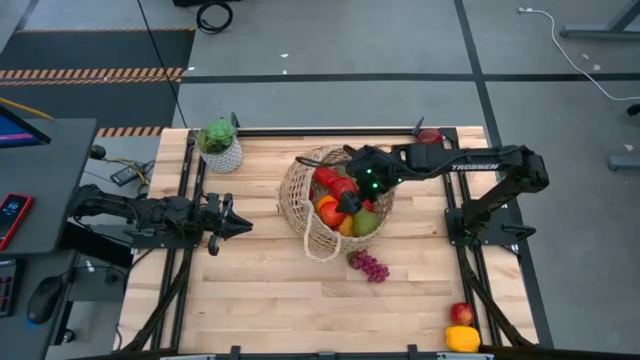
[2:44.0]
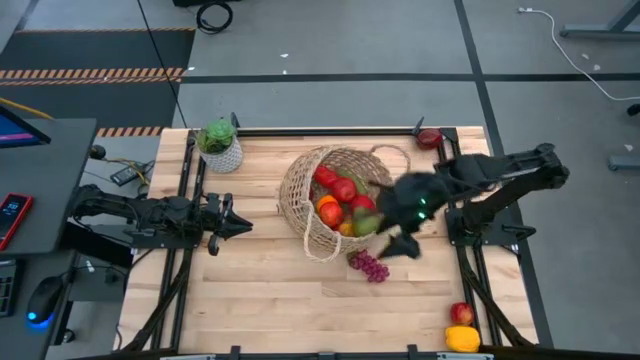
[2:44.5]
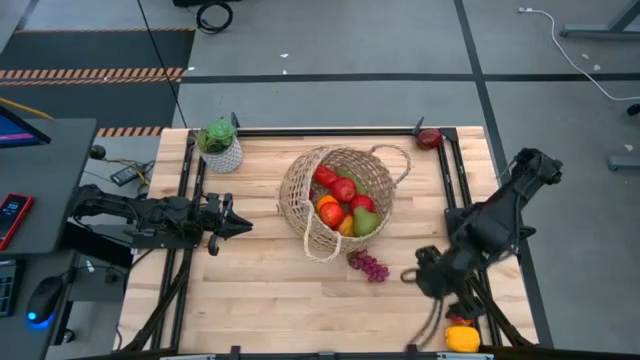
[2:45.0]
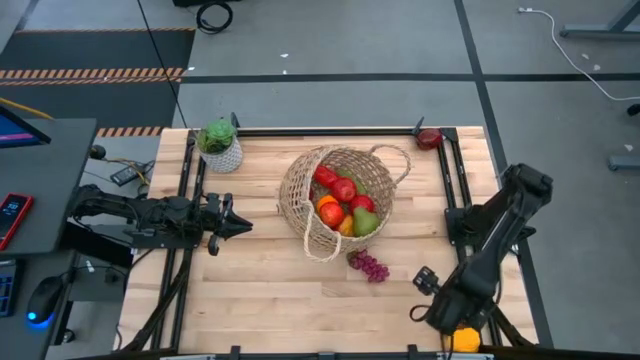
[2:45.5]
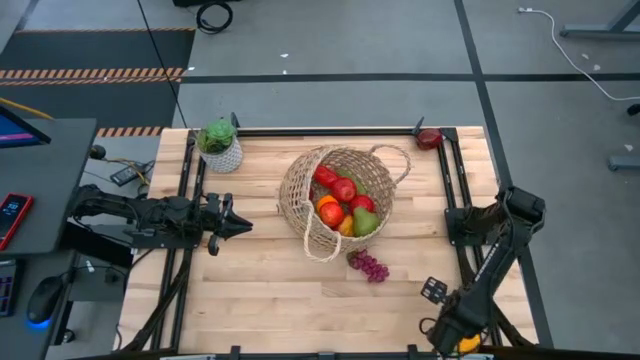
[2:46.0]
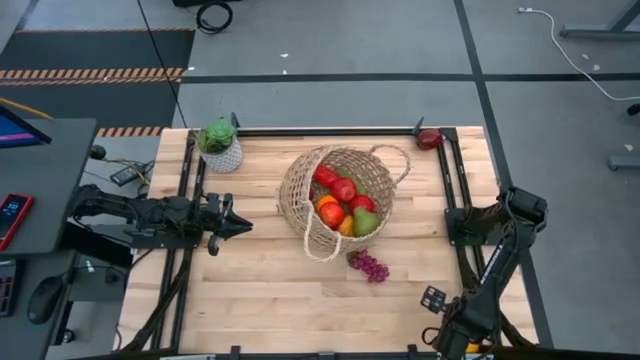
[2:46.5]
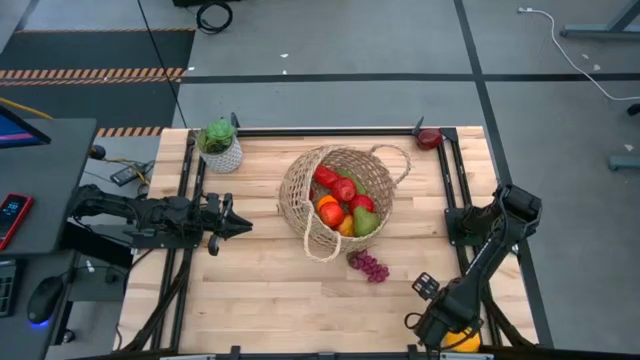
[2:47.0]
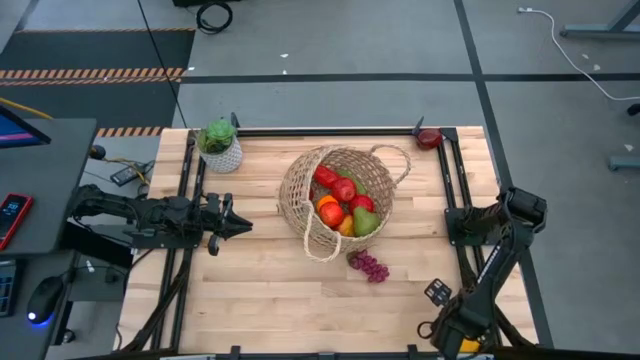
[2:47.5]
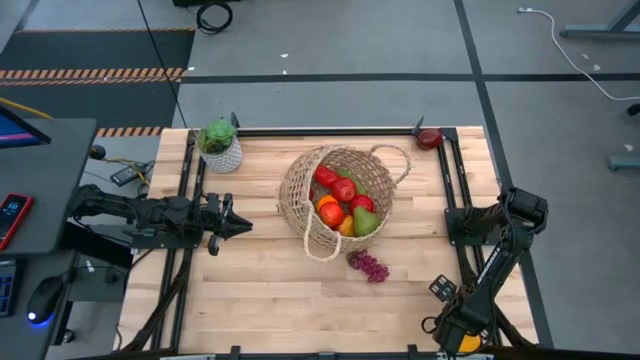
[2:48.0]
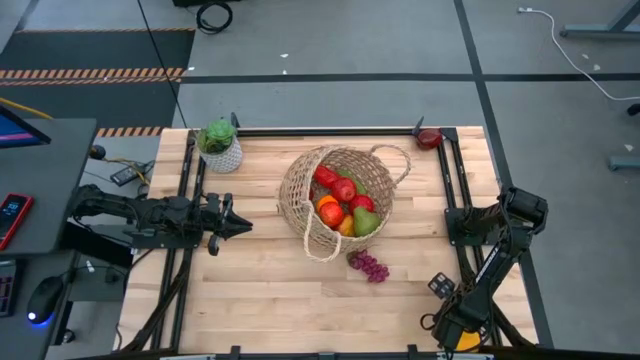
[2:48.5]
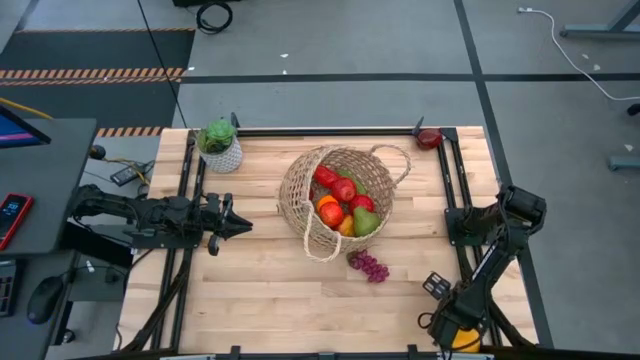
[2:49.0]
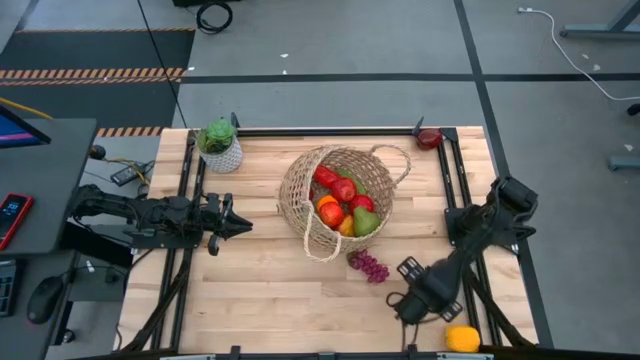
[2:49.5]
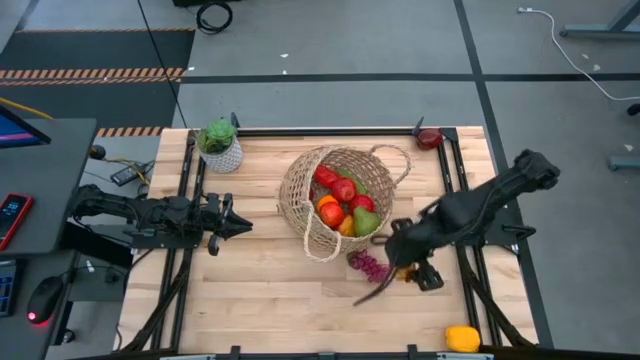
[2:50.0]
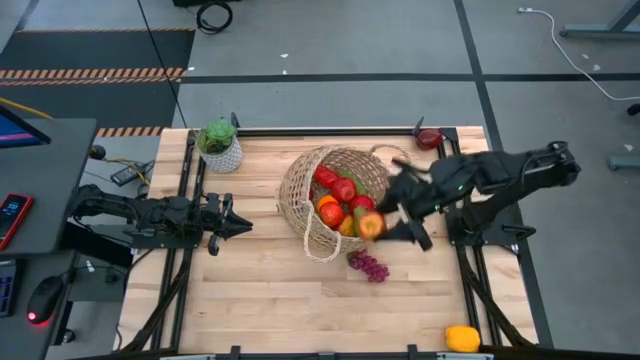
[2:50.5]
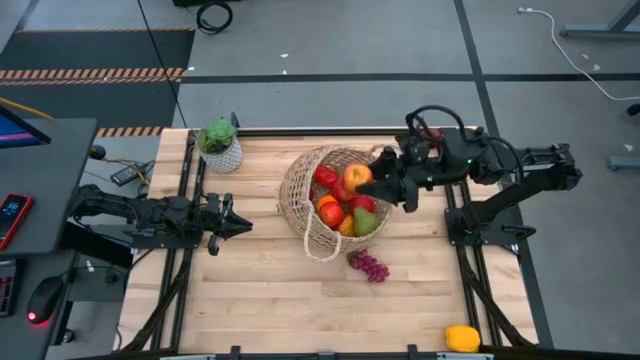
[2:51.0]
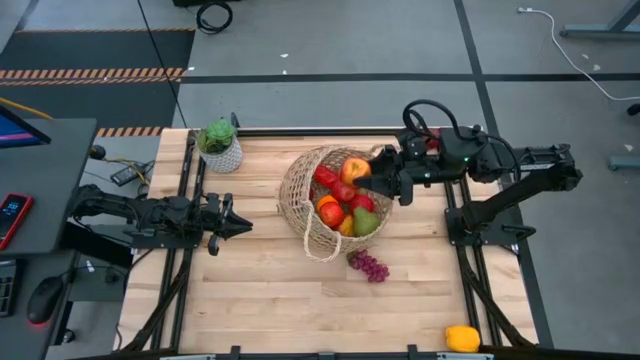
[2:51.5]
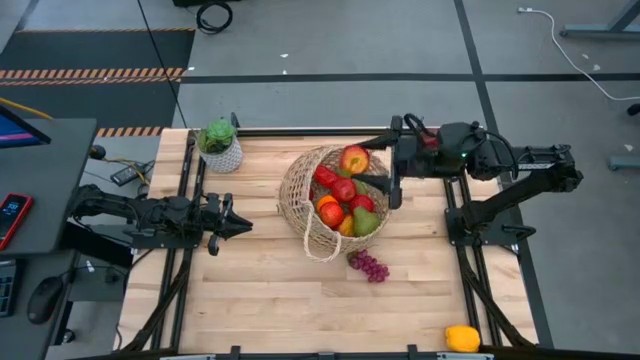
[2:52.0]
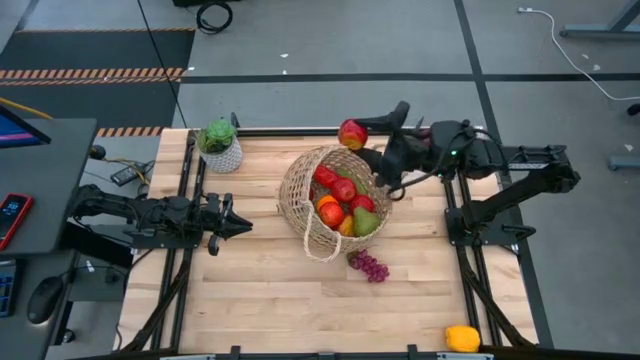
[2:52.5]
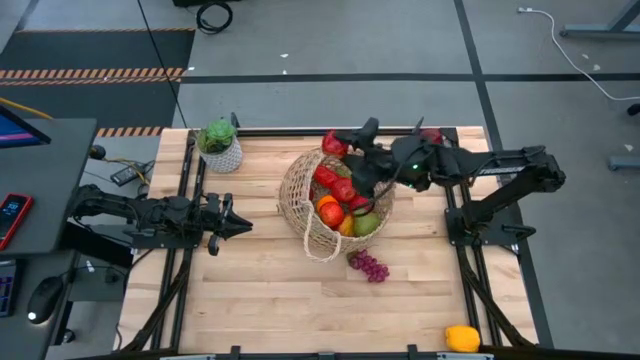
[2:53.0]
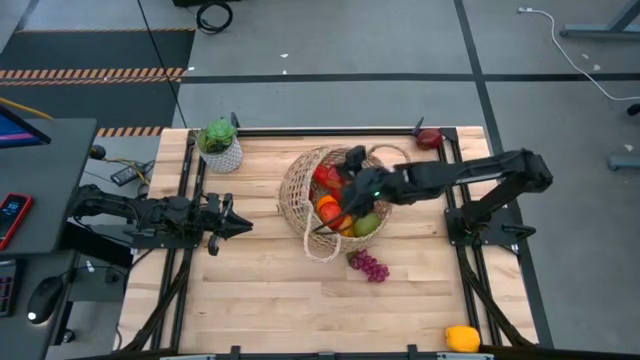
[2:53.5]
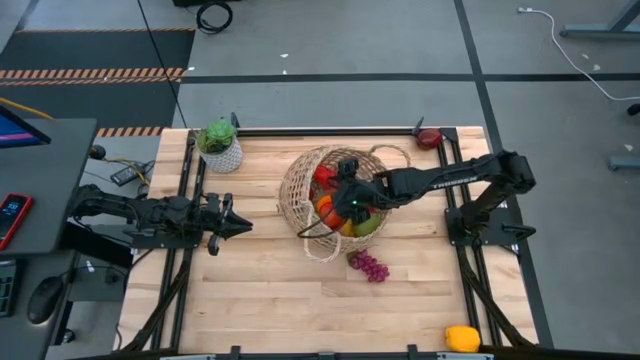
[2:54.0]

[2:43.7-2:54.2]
Task: Build produce basket
Put the red apple into the woven basket

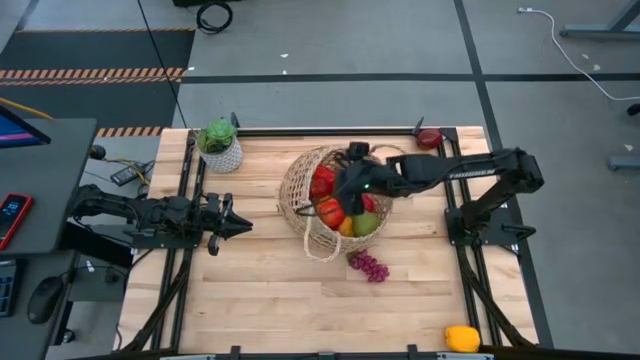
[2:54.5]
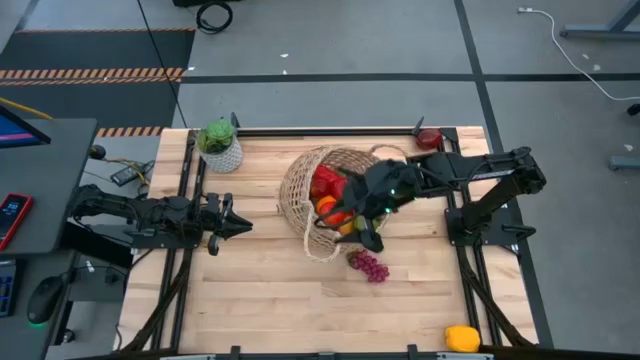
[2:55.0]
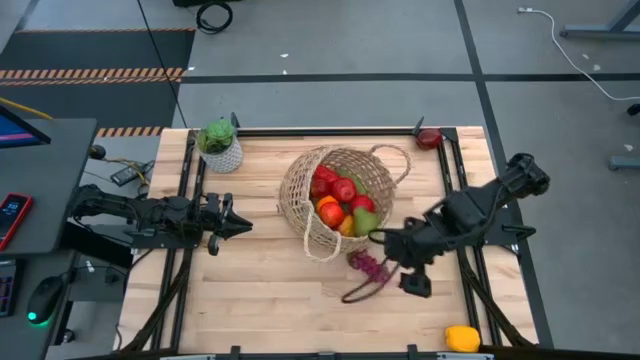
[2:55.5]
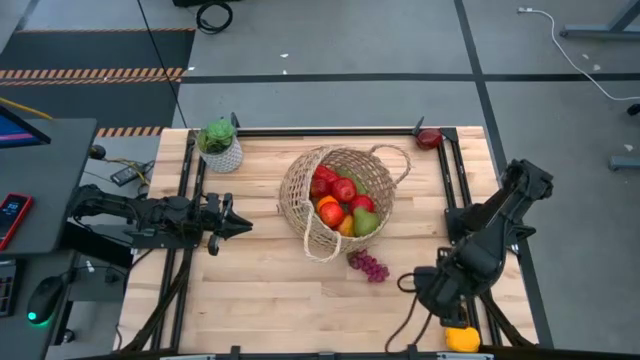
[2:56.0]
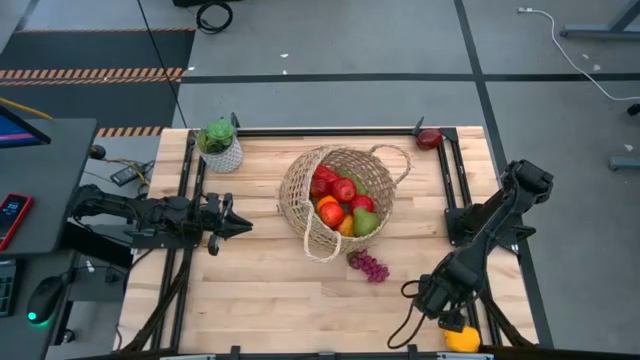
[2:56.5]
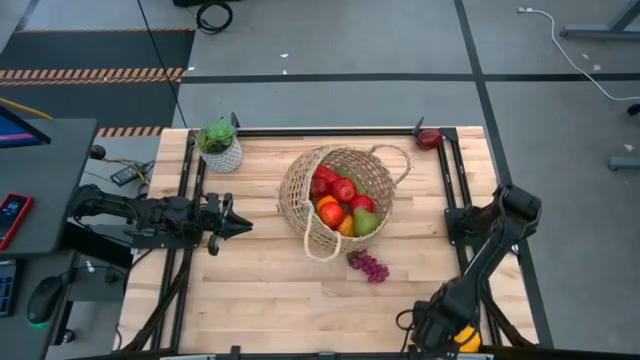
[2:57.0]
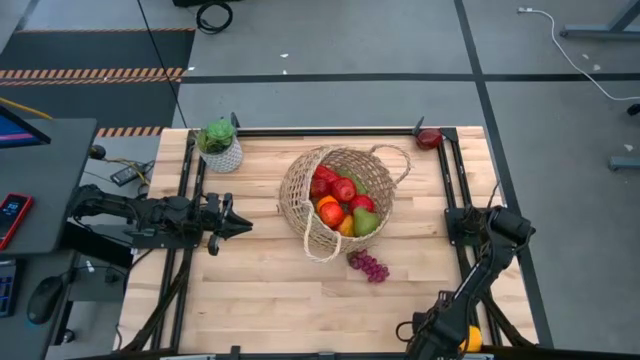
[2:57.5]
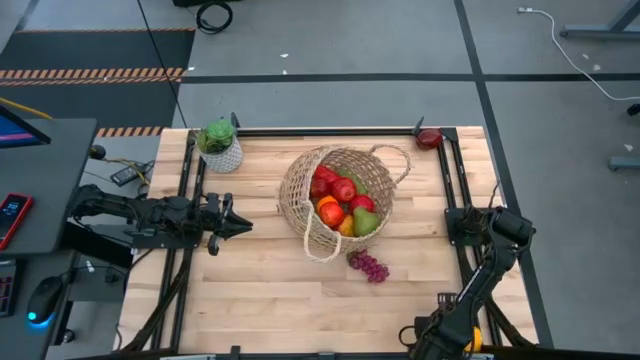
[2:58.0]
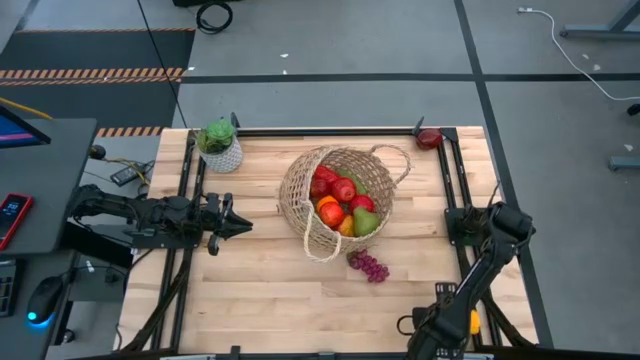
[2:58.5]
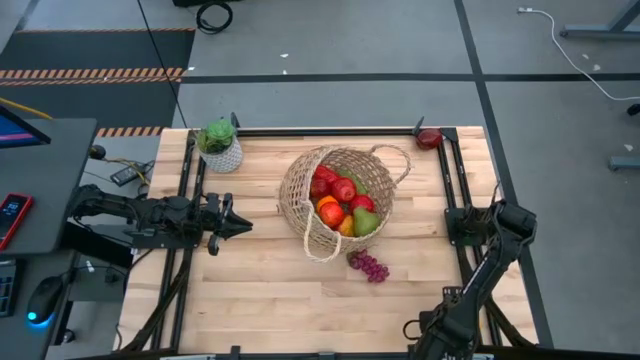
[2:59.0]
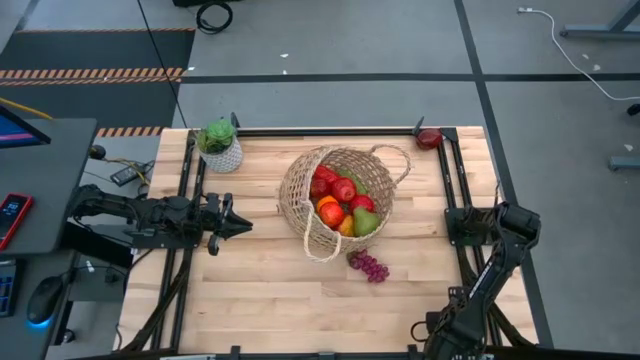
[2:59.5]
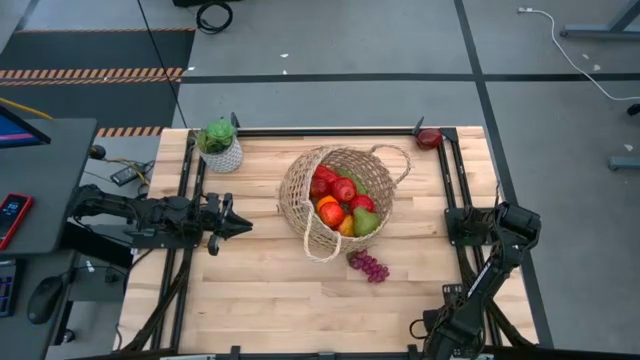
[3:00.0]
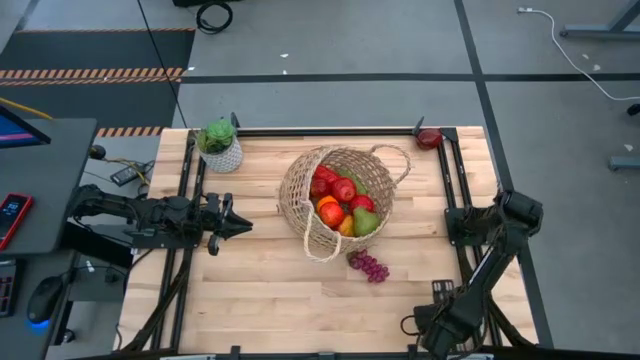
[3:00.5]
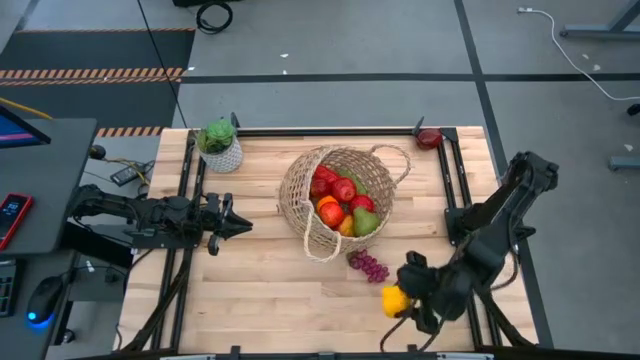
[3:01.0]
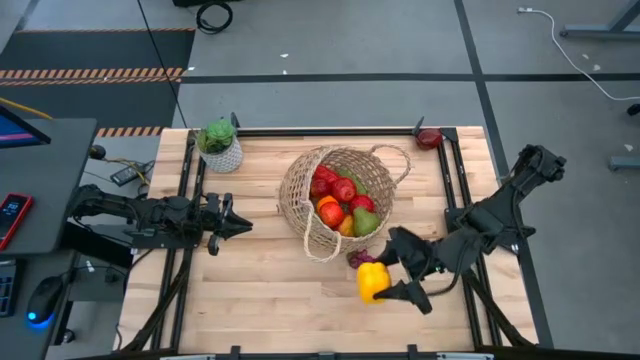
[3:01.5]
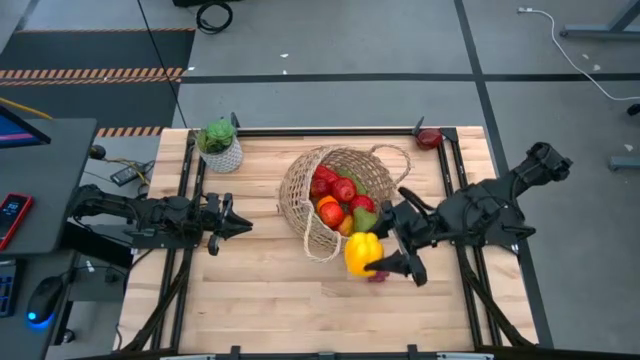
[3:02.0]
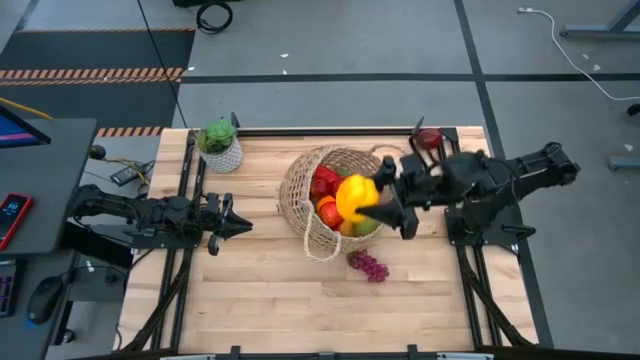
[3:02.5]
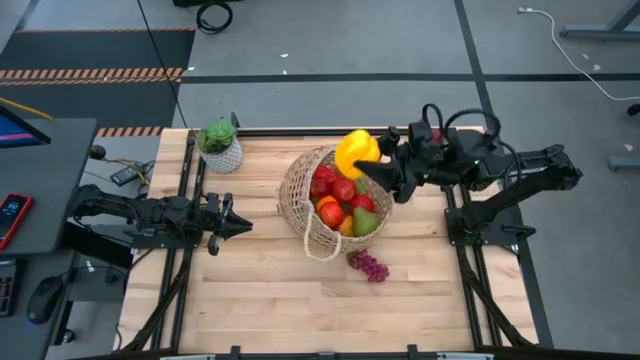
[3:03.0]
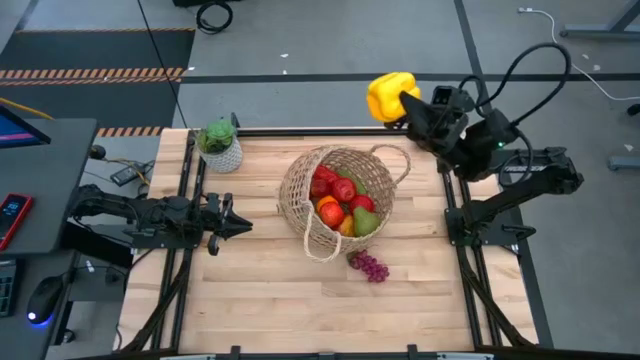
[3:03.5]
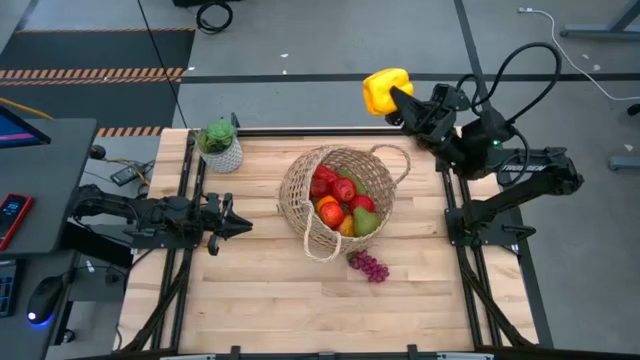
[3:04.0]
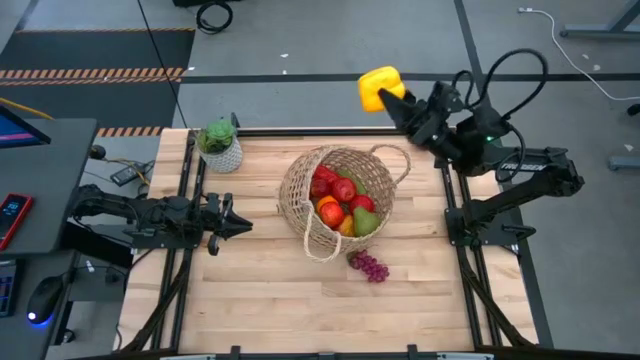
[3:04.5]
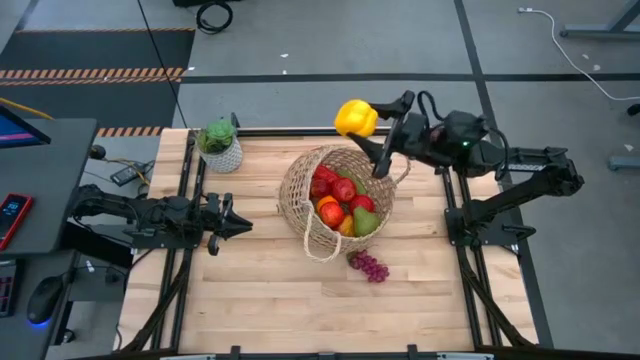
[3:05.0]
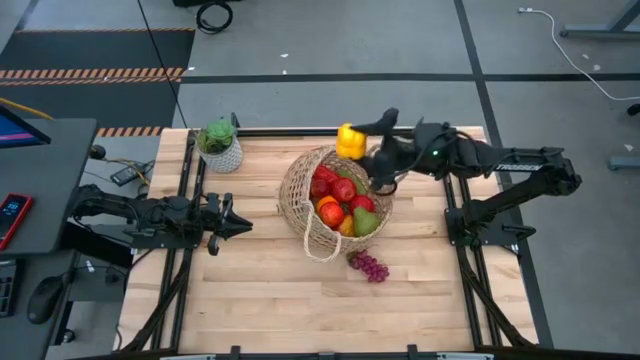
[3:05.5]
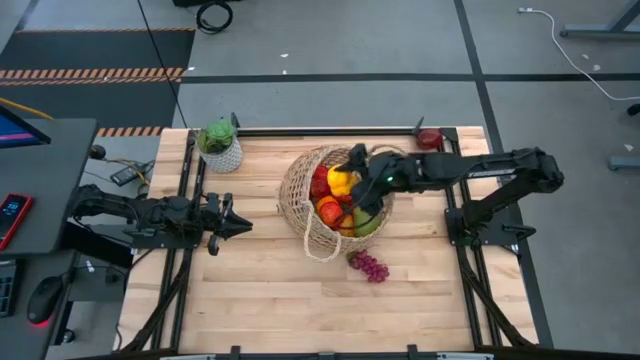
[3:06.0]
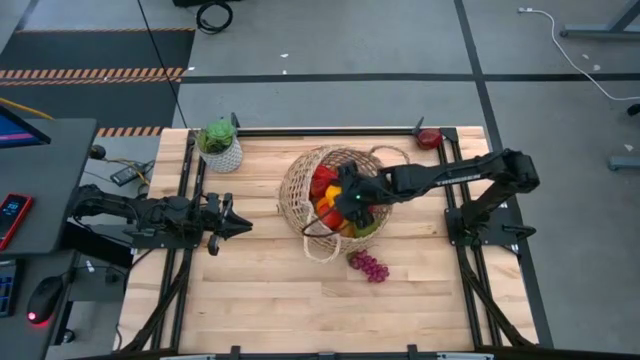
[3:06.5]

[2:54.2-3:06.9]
Put the yellow bell pepper into the woven basket
